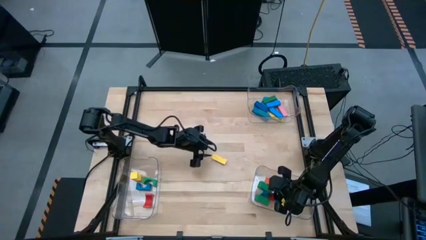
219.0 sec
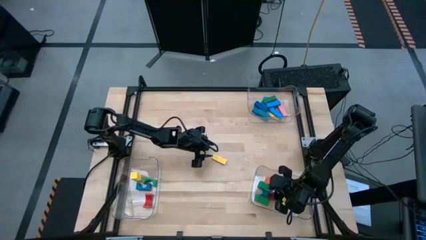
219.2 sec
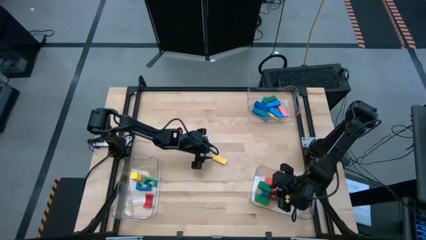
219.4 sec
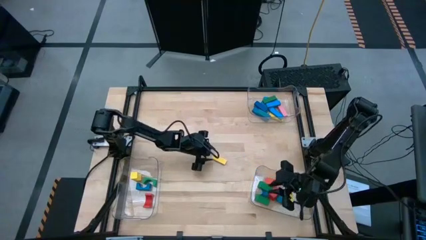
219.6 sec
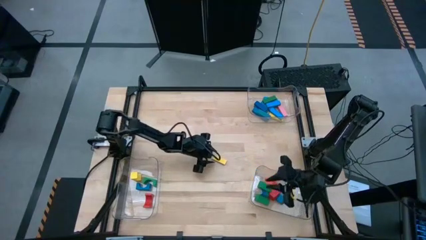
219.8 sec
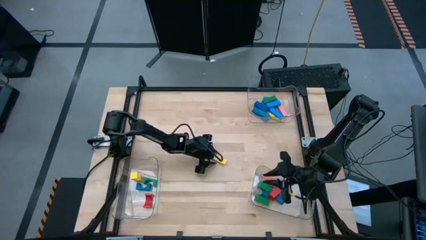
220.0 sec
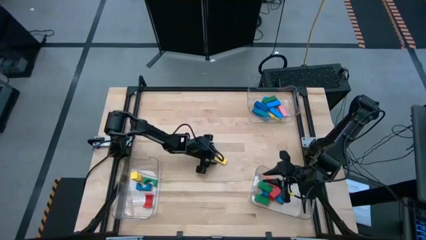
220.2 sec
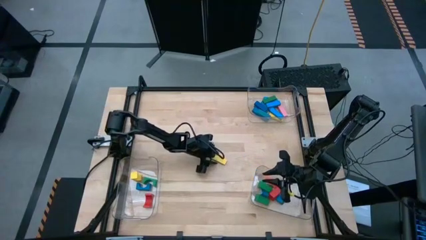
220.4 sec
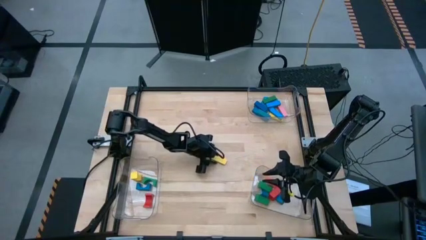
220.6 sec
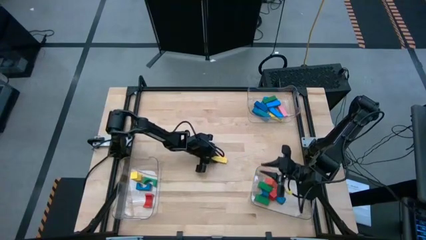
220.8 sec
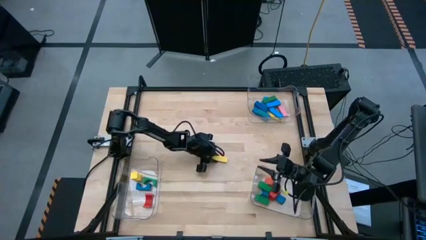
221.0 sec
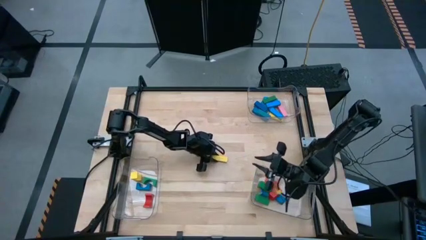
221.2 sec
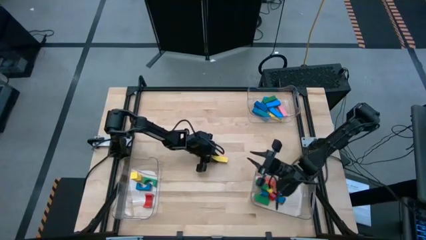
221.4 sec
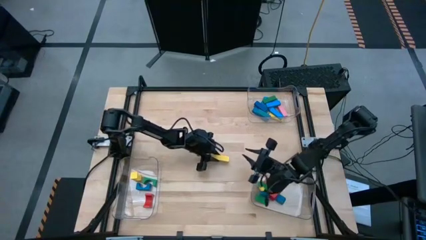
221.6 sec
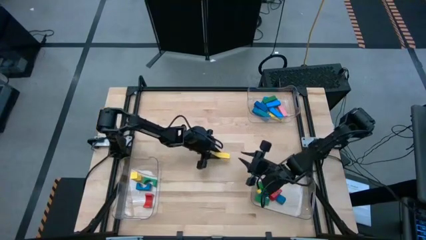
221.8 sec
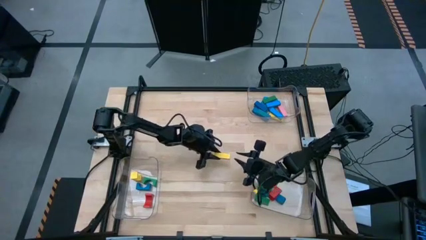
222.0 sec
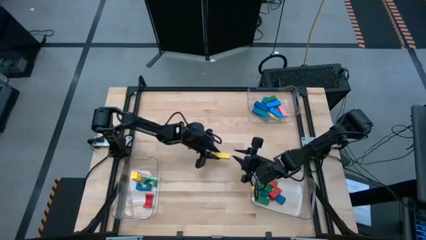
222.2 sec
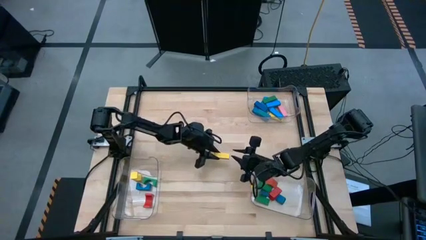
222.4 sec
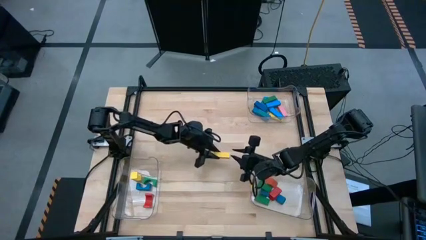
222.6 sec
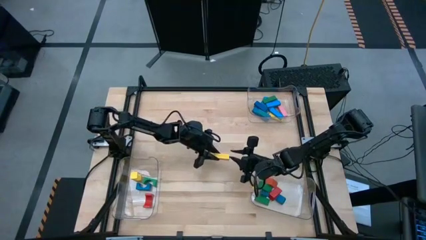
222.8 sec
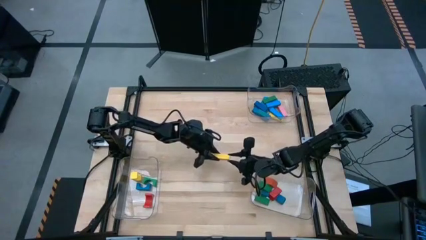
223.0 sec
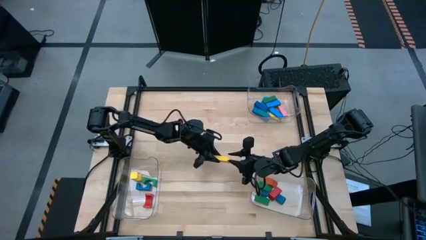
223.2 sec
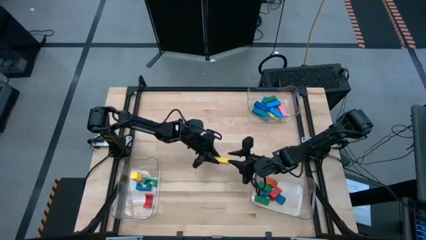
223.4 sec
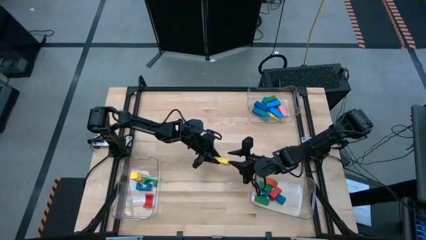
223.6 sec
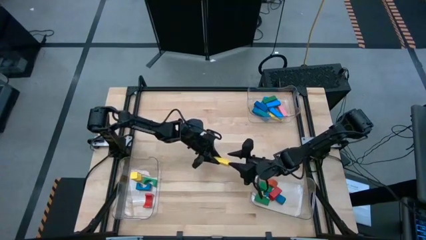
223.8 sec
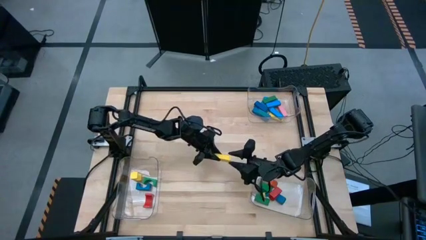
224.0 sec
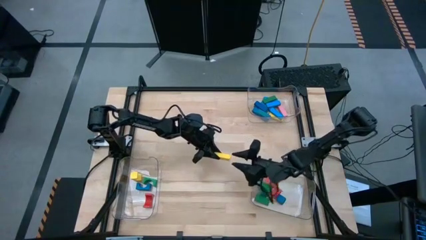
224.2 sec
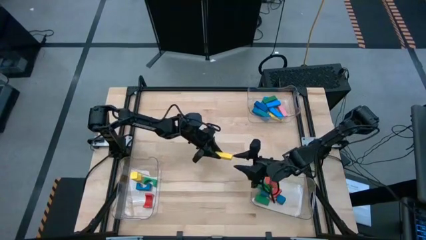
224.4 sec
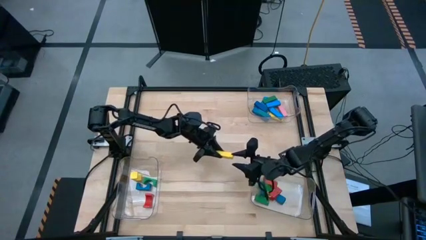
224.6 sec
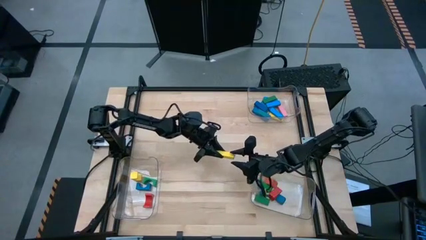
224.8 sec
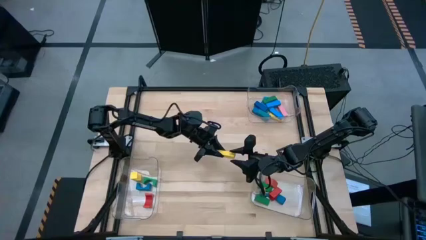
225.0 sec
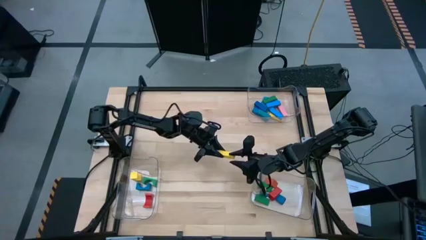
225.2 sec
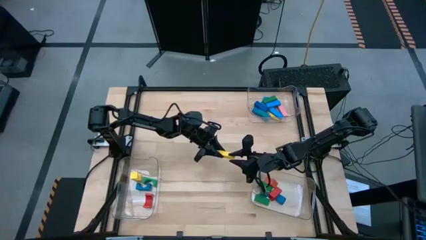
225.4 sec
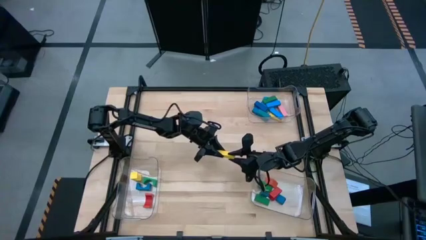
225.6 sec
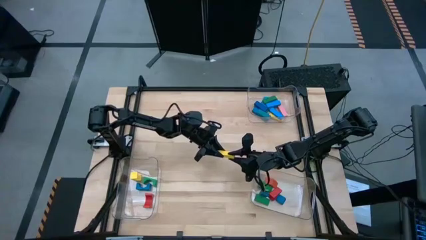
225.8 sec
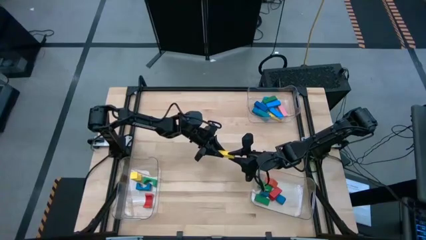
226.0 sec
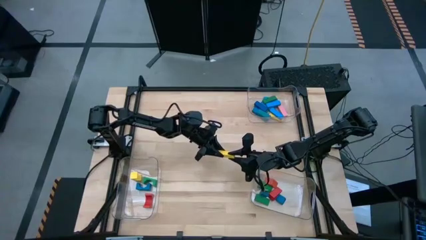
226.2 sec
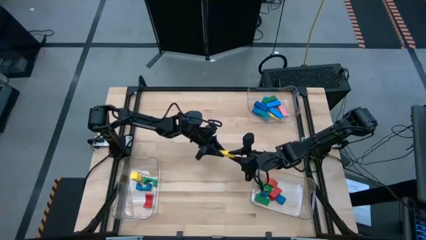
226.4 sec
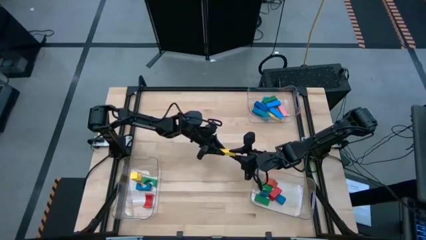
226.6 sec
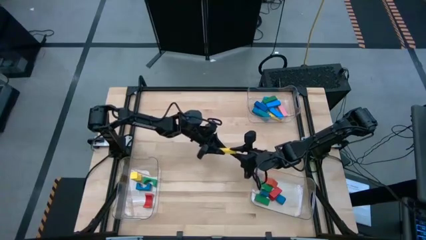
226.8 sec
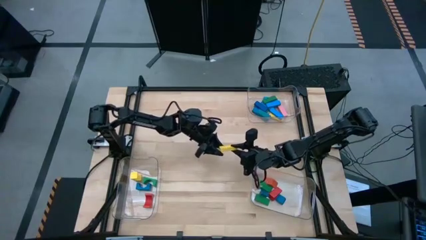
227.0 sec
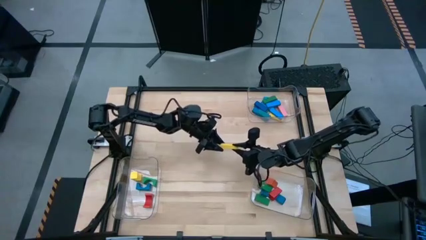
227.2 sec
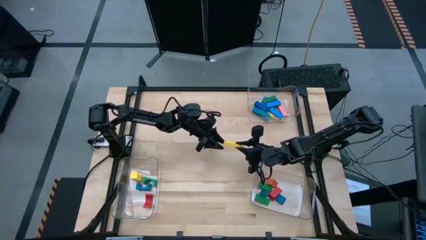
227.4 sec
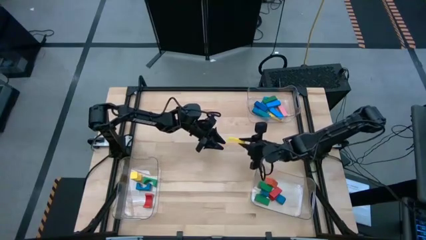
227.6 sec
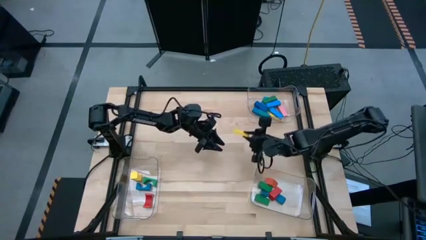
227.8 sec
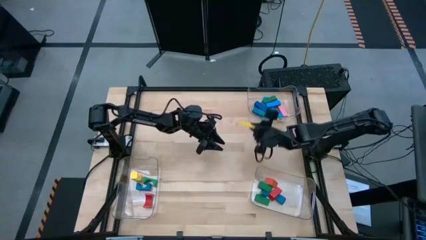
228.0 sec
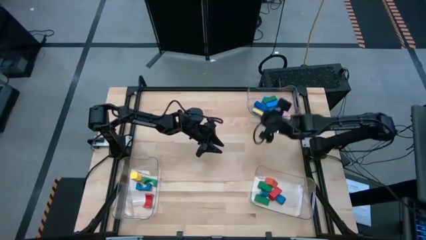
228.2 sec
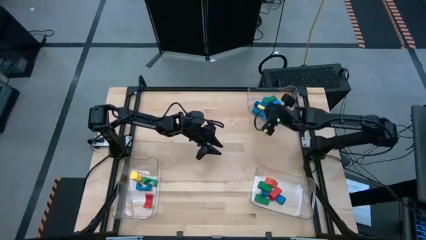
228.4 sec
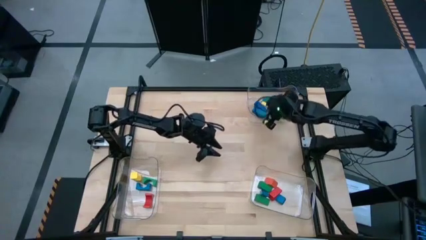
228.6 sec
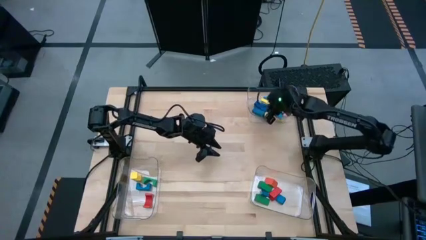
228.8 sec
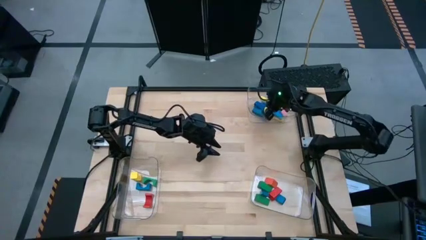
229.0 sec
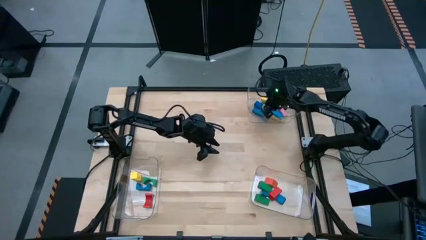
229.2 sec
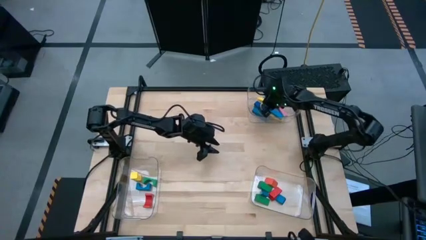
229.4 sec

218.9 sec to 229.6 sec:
Task: Sort blocks by size
Put the yellow rectangle block into the top right transparent bin

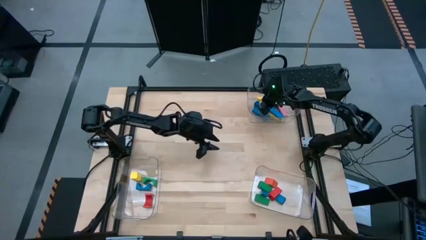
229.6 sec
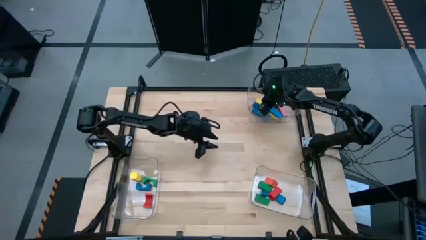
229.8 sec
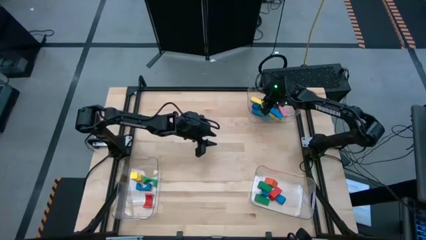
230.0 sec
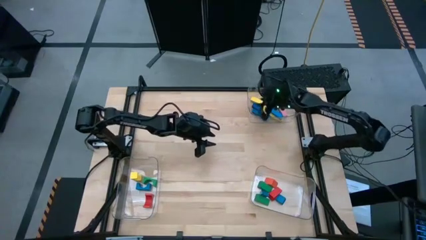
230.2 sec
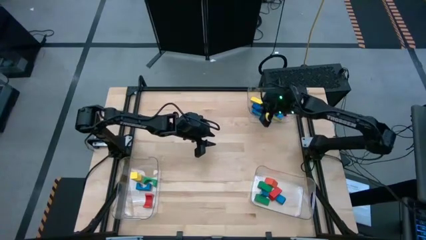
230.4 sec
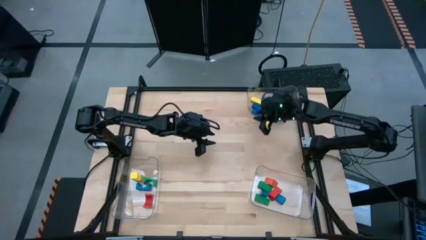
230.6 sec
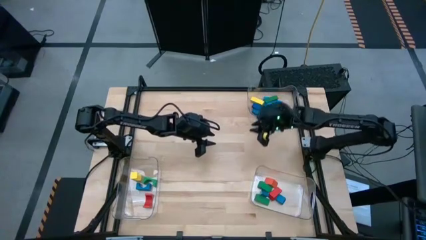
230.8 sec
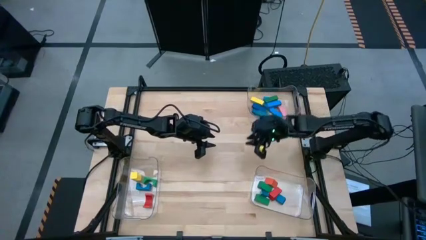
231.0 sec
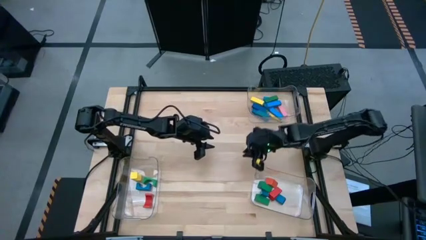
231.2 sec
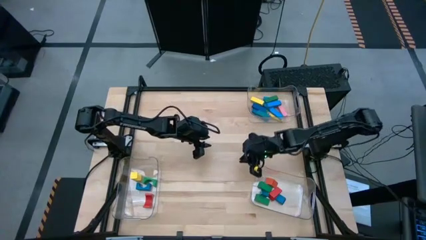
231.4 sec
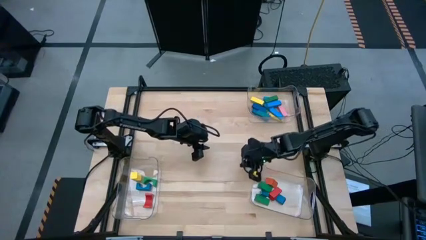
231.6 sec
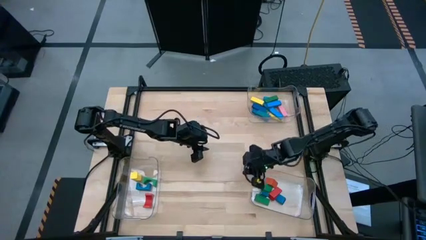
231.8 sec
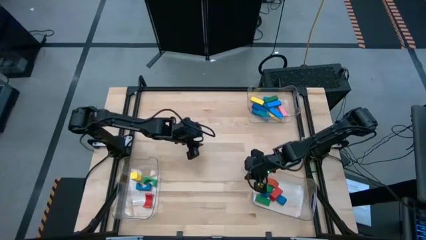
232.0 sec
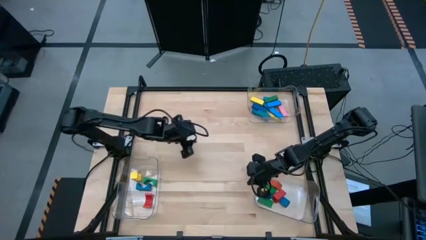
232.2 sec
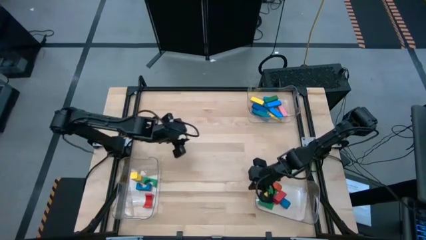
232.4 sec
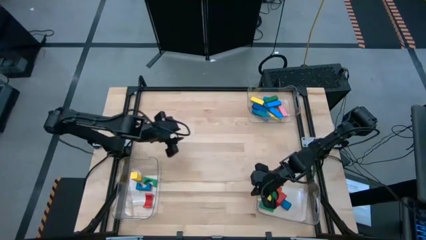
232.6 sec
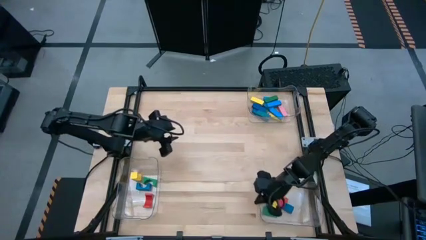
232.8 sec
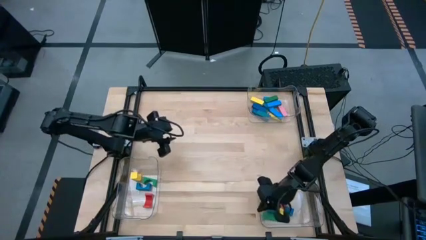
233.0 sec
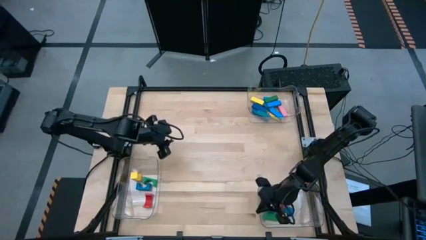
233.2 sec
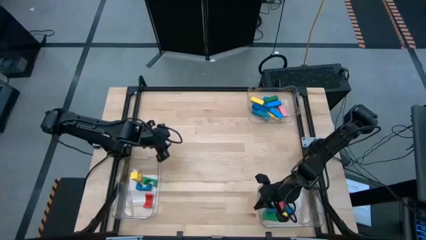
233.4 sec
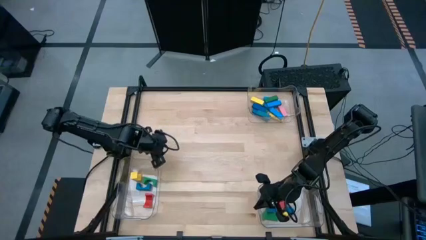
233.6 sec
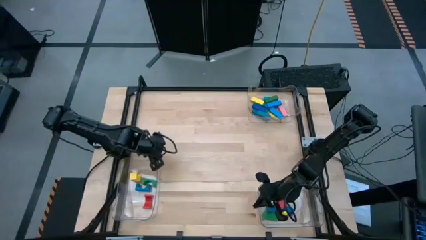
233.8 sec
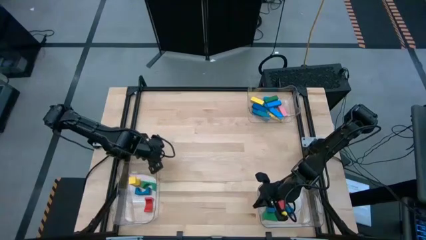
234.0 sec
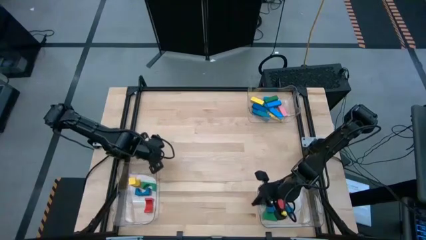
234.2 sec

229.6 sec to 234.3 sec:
Adjust the transparent bins on the bottom of the table
